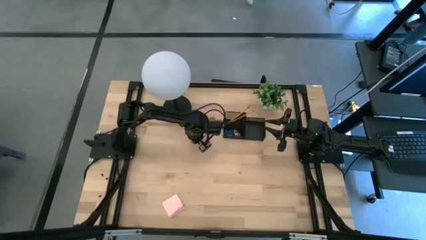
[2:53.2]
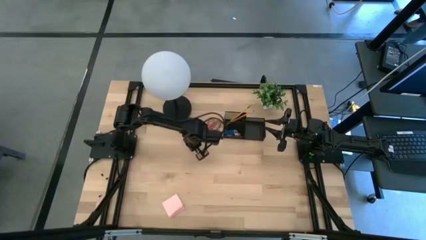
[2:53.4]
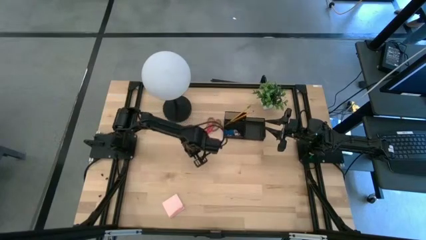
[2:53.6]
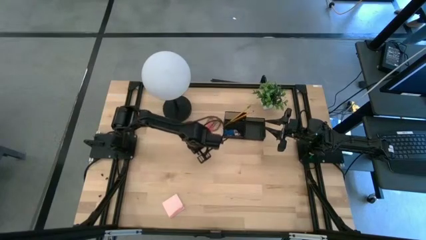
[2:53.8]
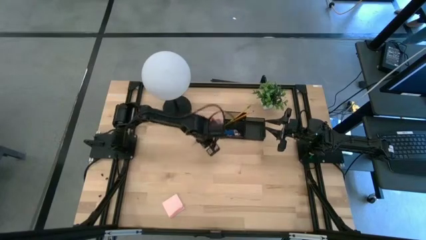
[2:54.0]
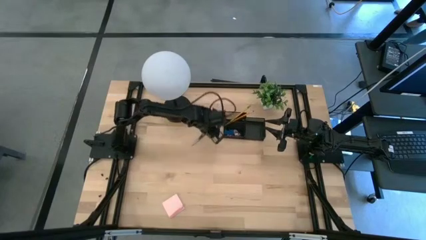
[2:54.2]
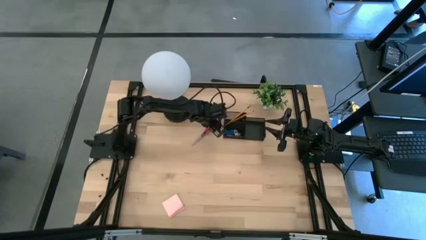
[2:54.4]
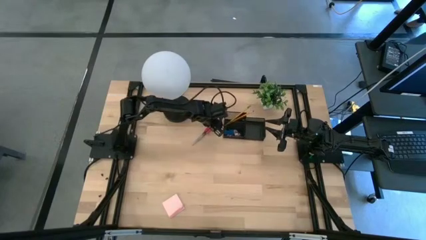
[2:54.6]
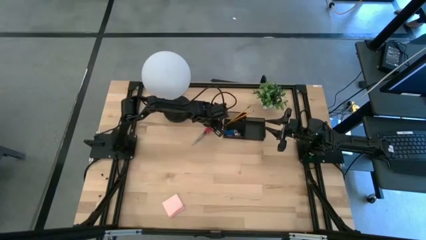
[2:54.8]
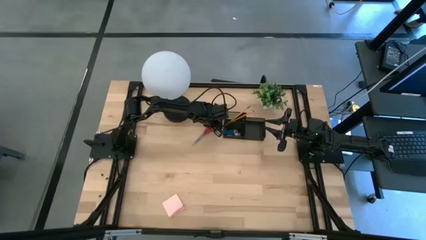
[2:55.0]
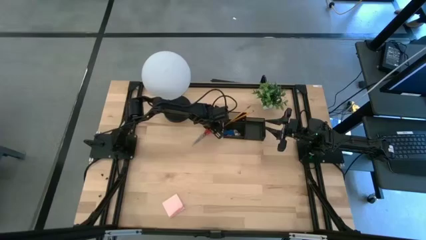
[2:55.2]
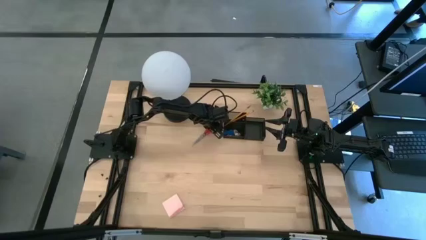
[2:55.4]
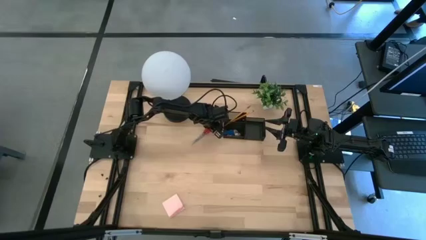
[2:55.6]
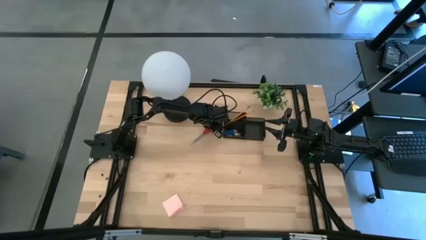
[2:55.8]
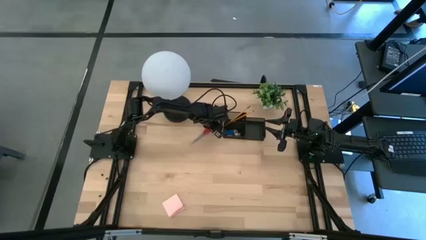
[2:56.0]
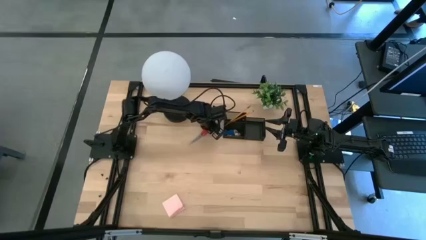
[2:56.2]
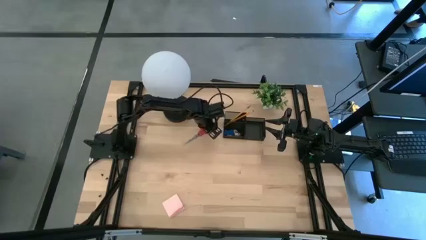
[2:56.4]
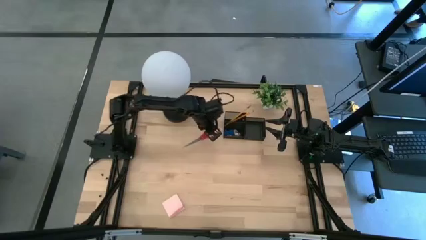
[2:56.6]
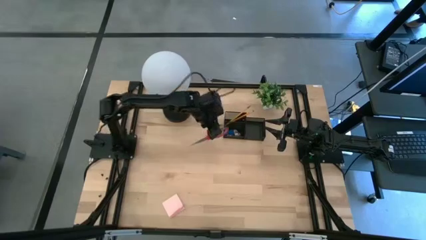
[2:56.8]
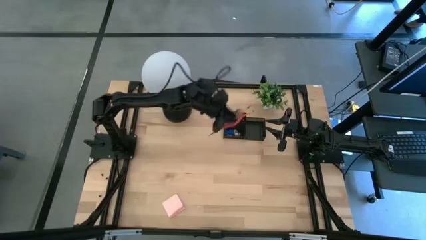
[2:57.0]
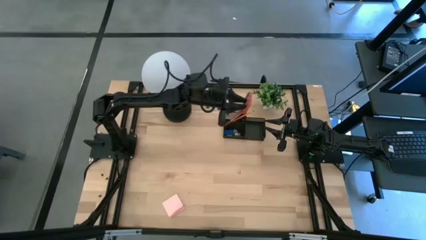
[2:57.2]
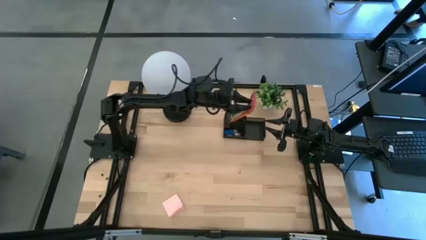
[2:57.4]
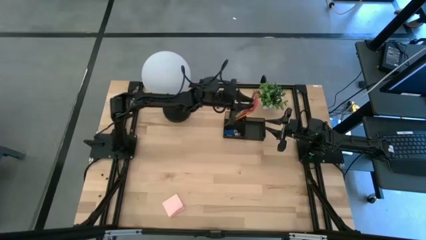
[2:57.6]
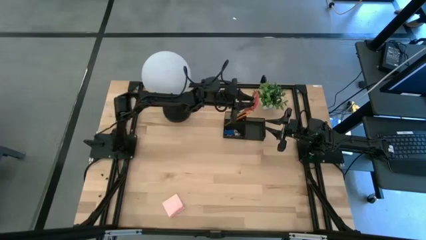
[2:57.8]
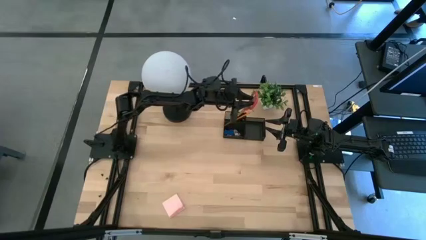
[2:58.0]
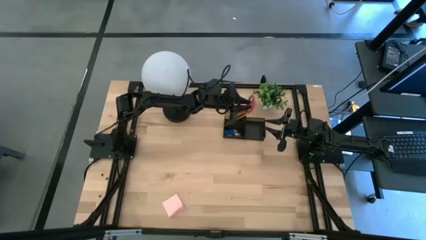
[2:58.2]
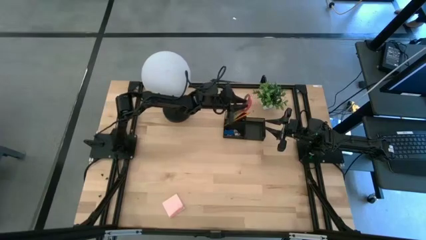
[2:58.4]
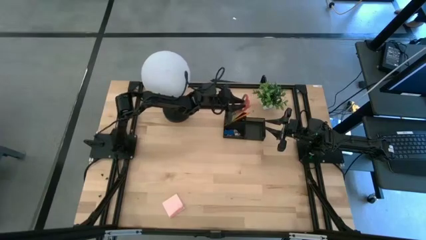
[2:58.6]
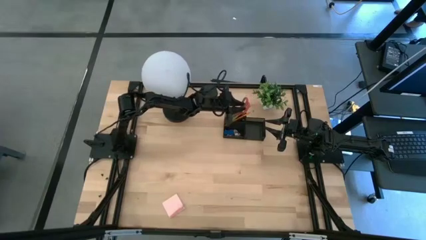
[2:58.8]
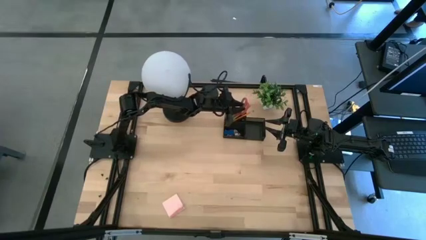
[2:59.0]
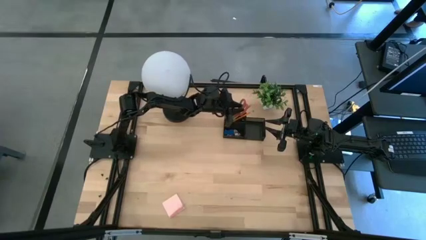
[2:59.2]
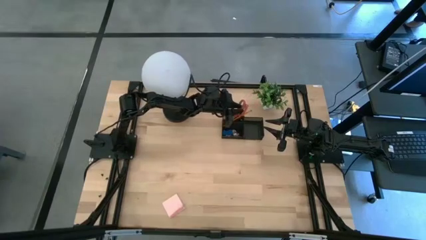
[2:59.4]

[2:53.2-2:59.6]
Task: Pick and place office supplies into organizer
Put the red scissors into the black desk organizer

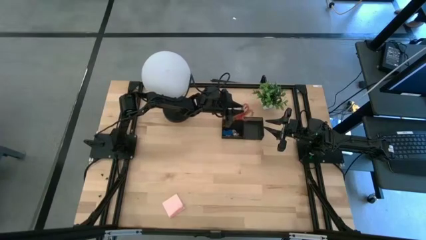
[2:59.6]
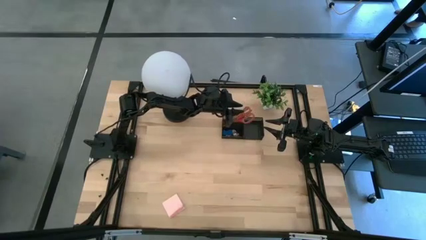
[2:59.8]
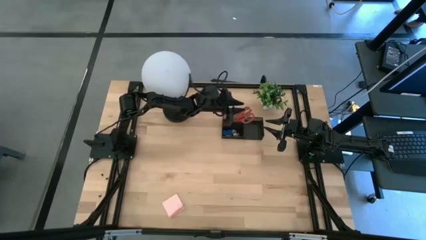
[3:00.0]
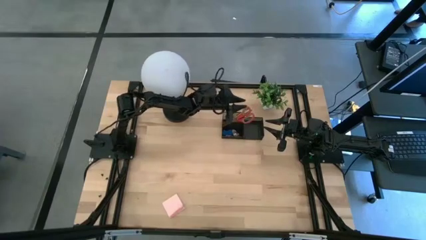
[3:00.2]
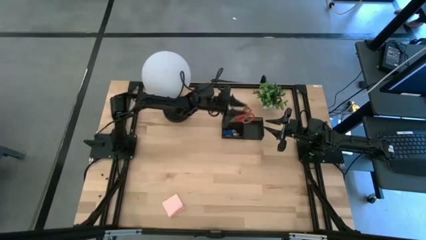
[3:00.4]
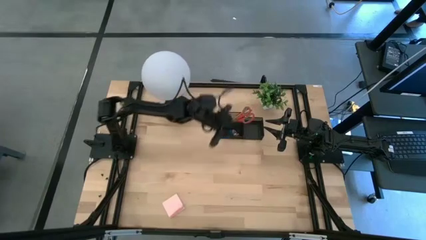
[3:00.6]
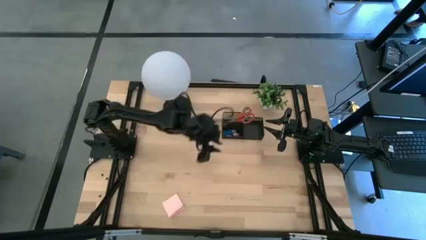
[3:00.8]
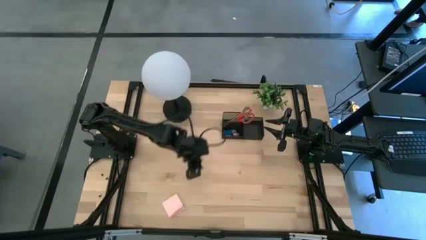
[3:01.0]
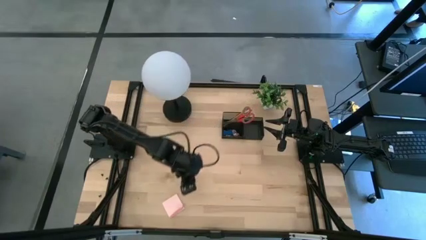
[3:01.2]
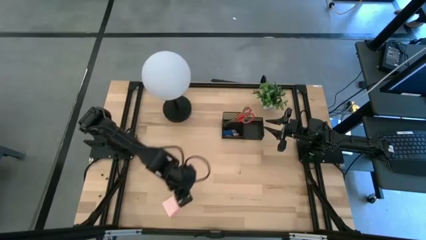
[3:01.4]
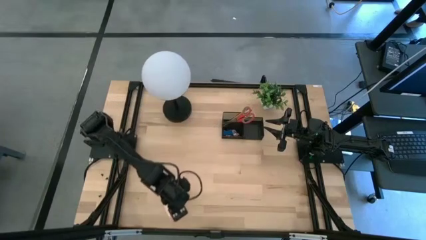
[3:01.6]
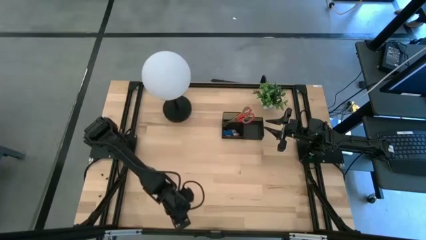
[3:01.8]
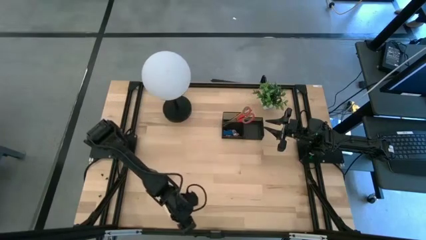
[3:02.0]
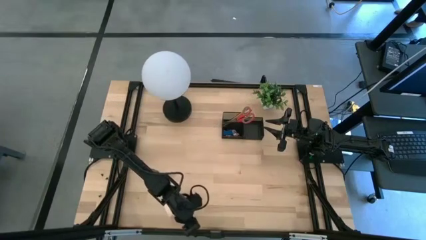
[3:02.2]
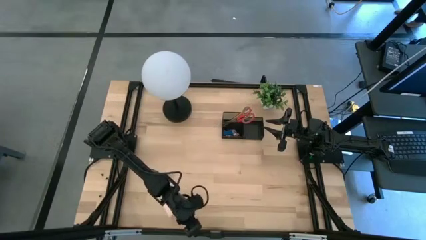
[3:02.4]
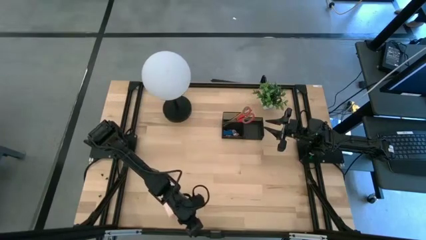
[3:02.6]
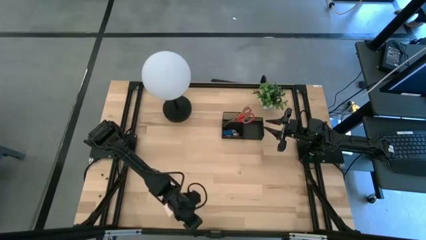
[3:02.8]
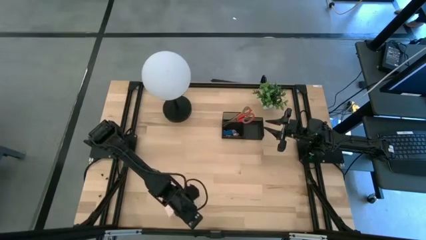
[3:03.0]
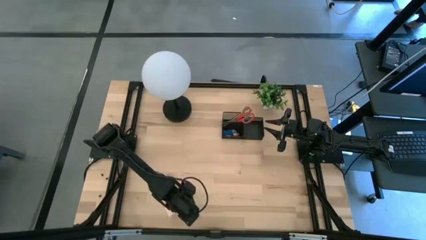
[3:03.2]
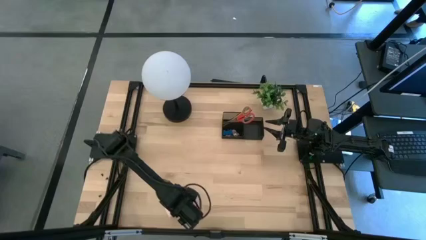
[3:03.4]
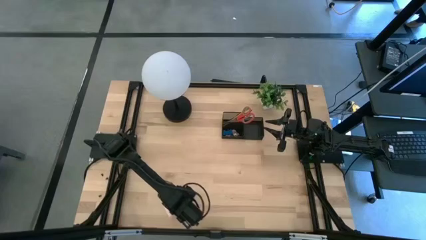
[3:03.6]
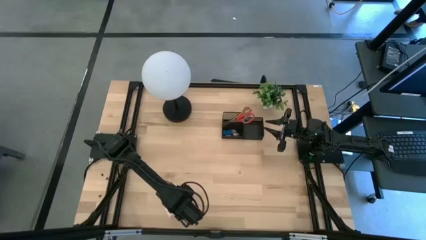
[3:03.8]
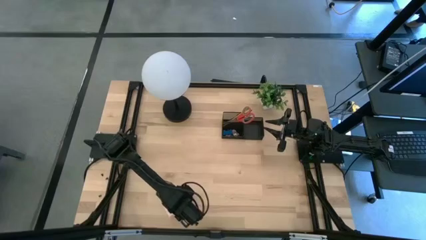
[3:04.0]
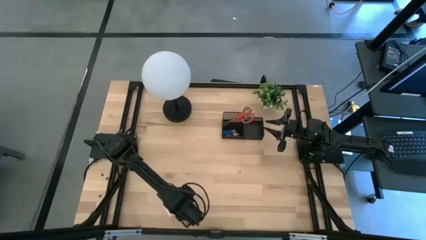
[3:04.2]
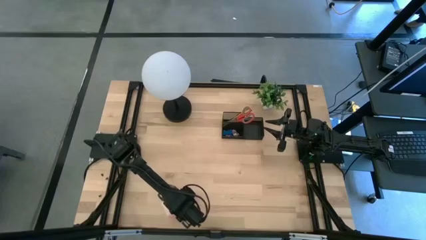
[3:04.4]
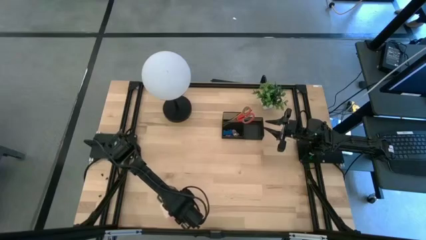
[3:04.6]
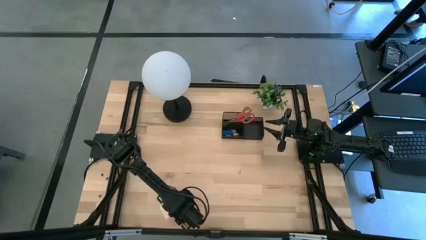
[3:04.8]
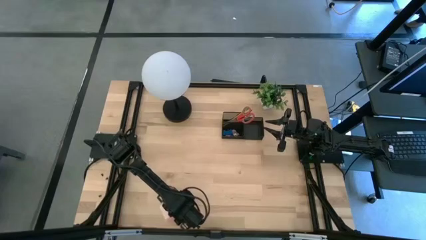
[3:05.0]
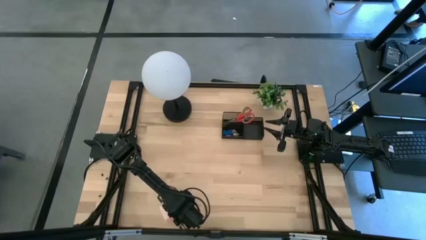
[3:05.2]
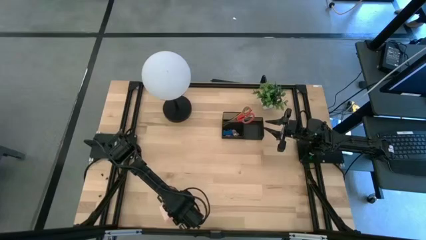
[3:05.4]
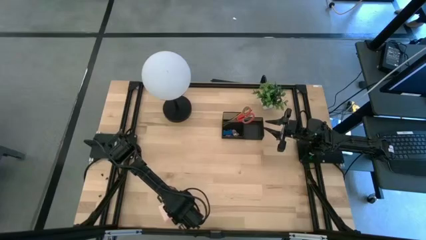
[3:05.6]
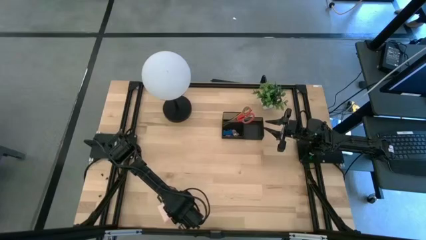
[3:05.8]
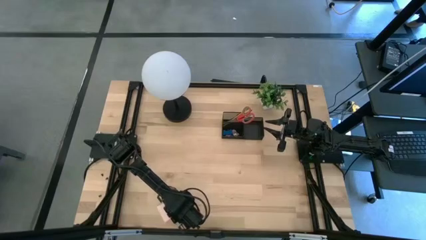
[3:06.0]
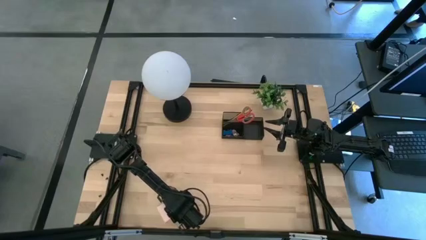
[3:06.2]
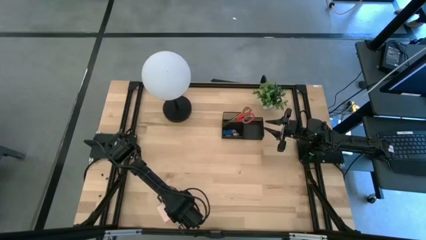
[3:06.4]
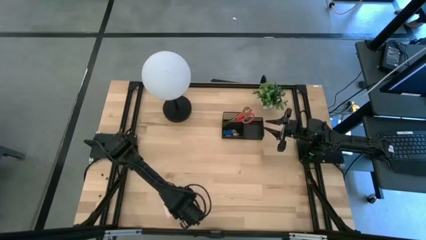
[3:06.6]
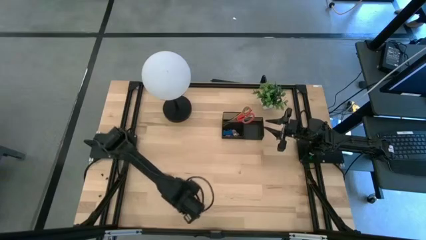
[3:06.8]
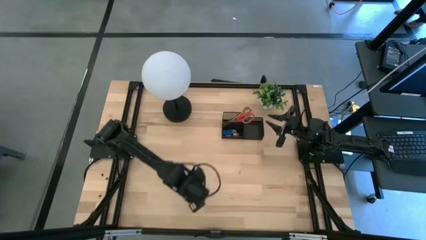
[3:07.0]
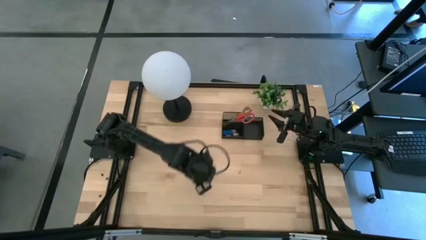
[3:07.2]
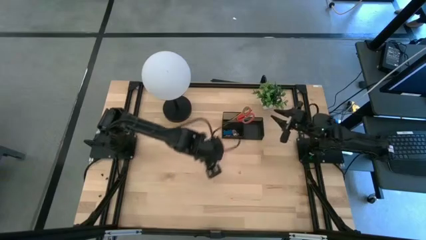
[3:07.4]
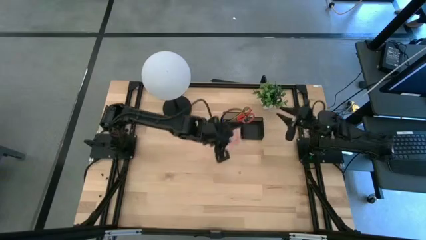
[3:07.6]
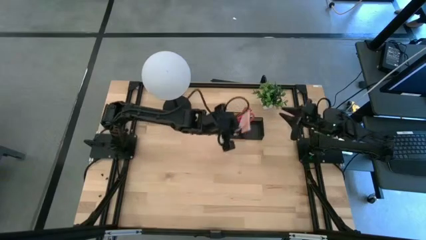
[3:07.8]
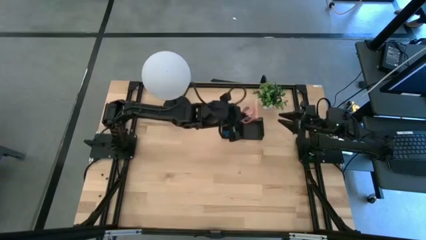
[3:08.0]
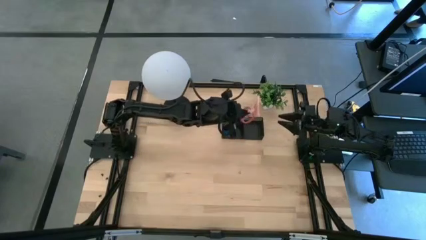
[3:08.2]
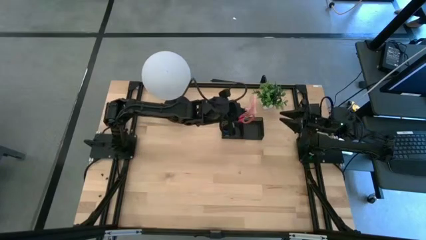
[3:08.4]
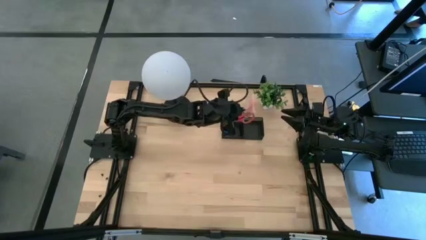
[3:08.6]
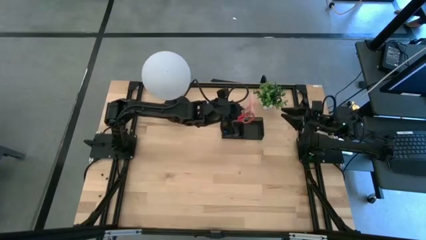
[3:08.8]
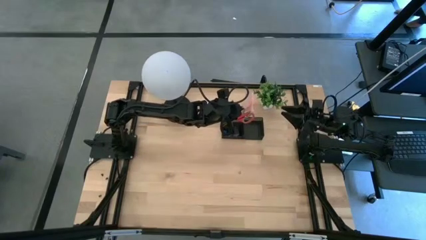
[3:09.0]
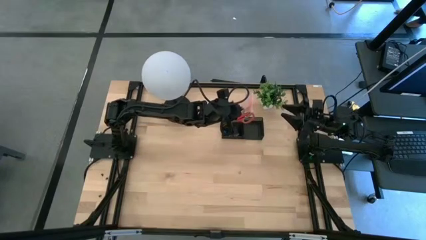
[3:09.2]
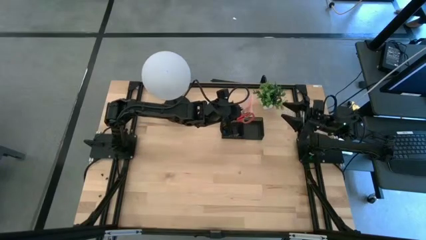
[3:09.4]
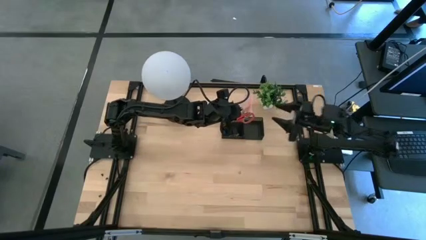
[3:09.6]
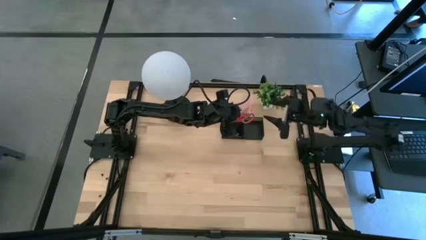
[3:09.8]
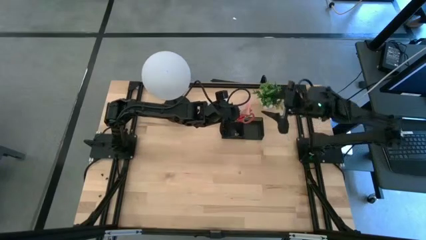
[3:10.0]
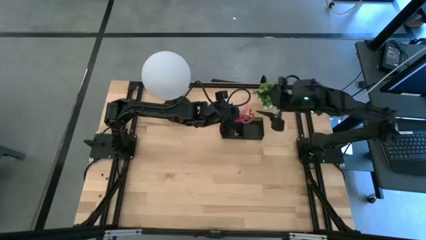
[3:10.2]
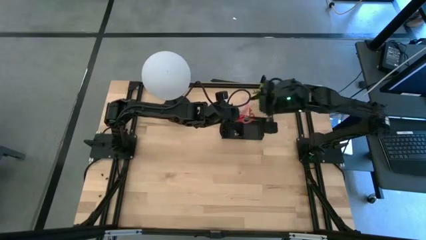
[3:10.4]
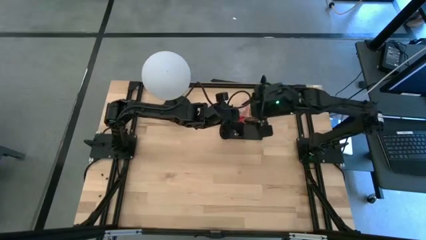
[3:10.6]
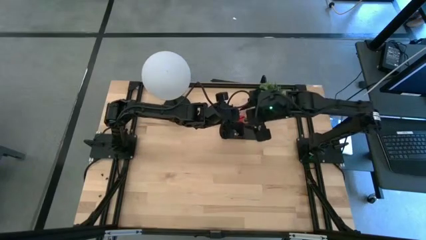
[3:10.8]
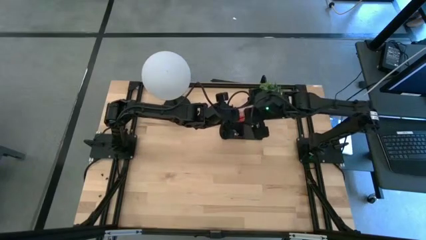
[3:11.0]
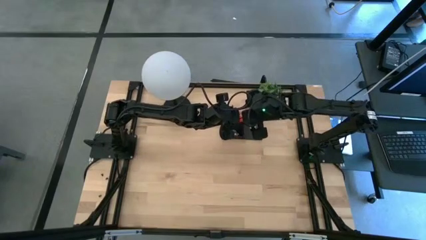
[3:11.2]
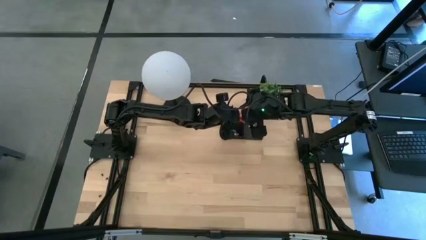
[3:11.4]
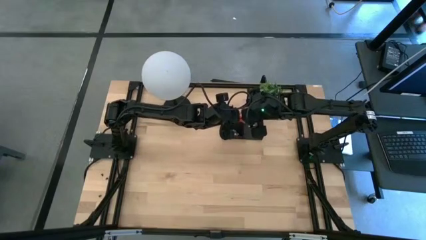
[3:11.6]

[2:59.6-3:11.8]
Put the pink sticky notes into the black desk organizer
